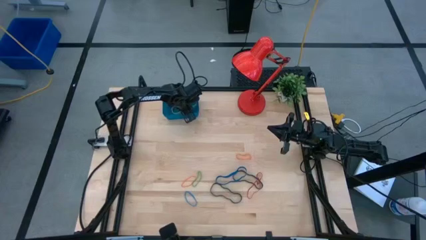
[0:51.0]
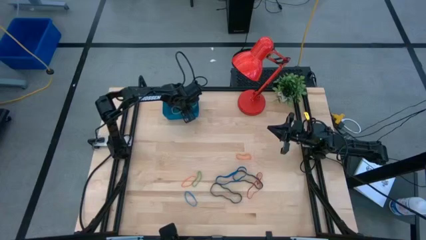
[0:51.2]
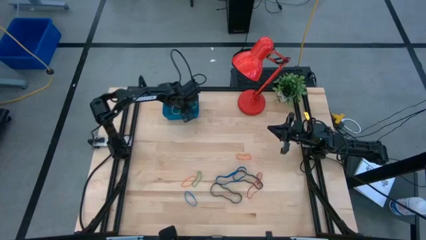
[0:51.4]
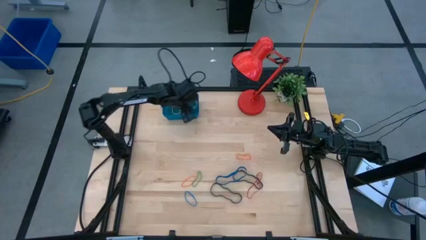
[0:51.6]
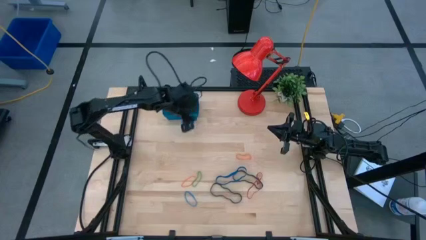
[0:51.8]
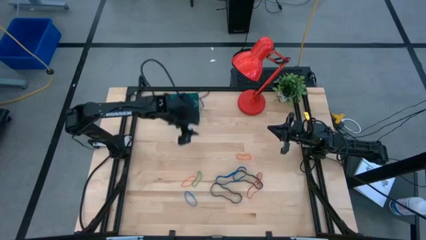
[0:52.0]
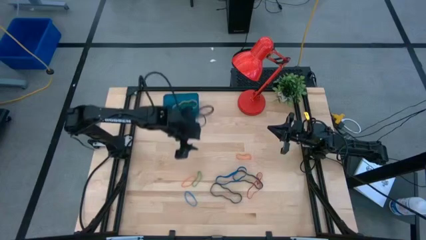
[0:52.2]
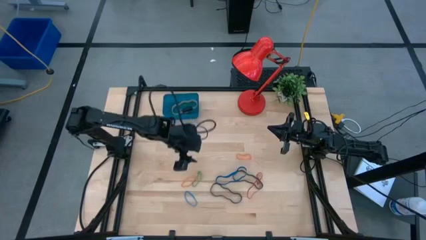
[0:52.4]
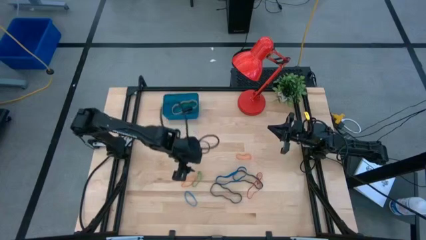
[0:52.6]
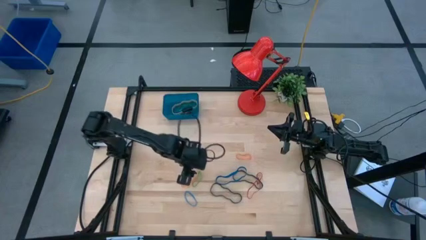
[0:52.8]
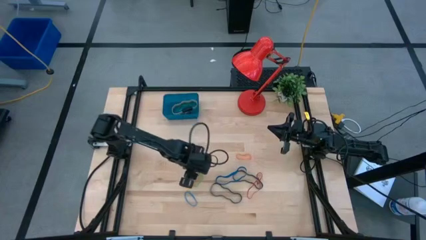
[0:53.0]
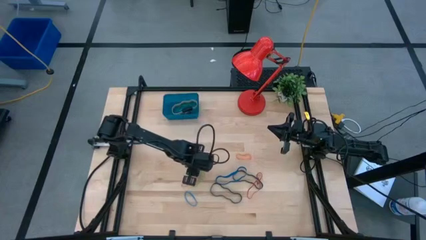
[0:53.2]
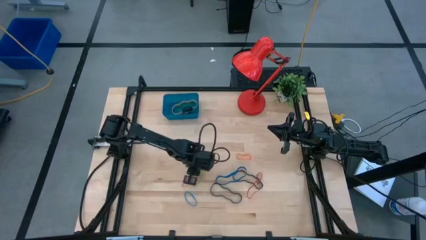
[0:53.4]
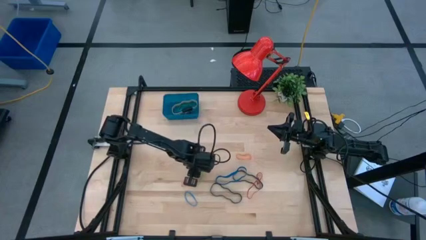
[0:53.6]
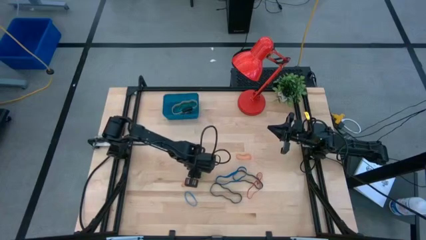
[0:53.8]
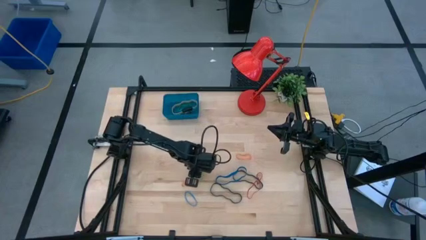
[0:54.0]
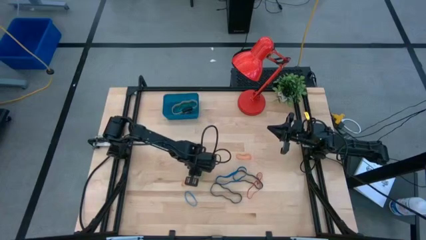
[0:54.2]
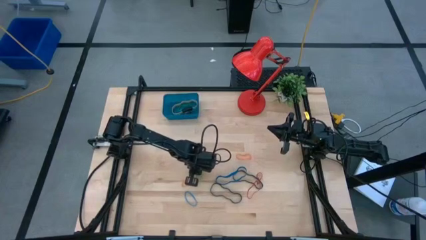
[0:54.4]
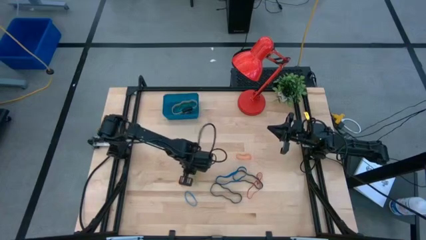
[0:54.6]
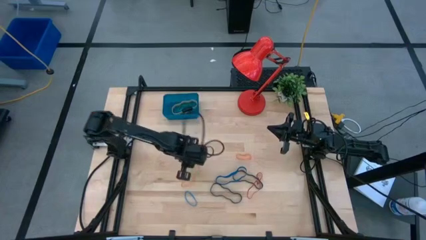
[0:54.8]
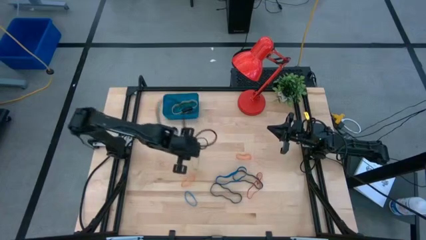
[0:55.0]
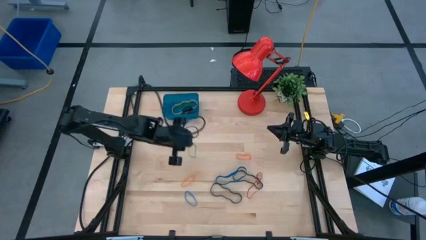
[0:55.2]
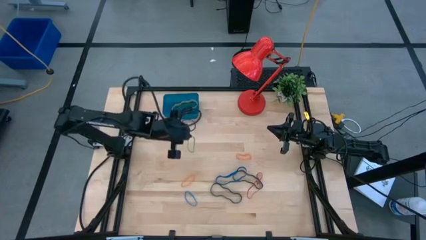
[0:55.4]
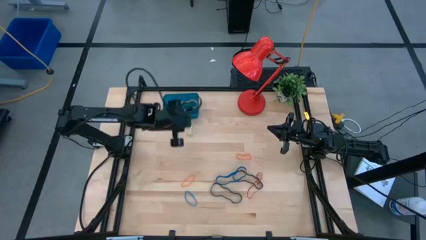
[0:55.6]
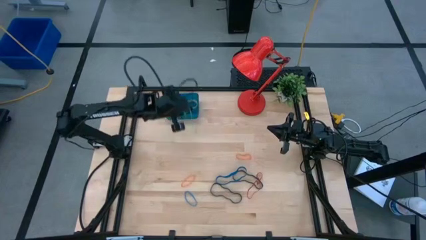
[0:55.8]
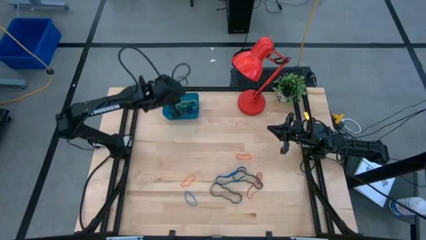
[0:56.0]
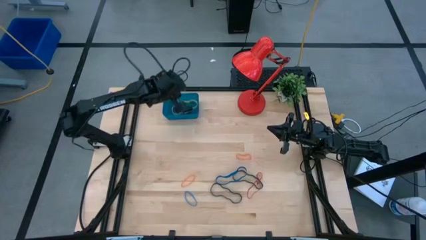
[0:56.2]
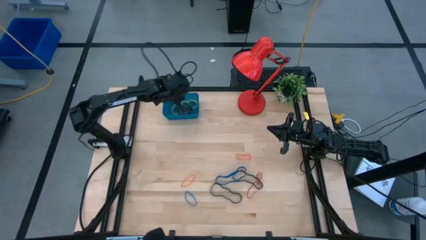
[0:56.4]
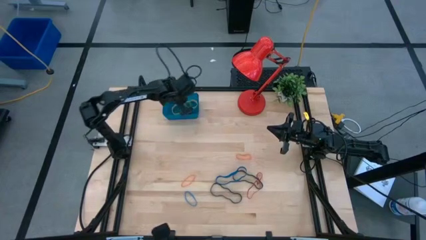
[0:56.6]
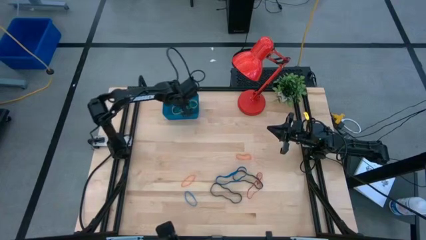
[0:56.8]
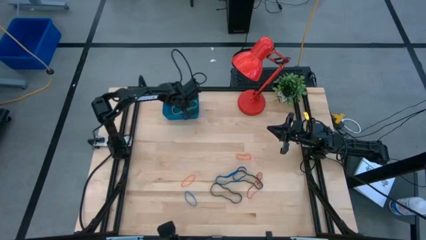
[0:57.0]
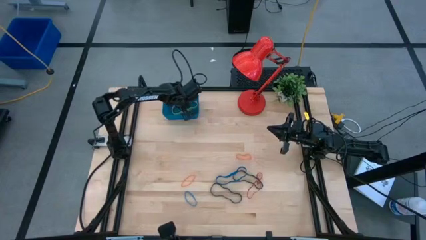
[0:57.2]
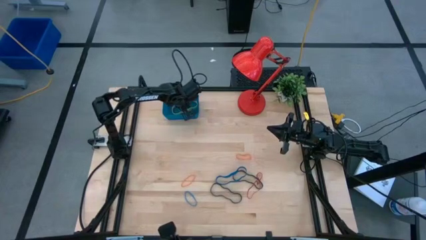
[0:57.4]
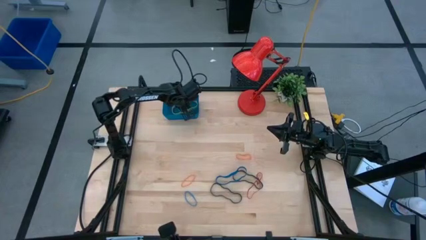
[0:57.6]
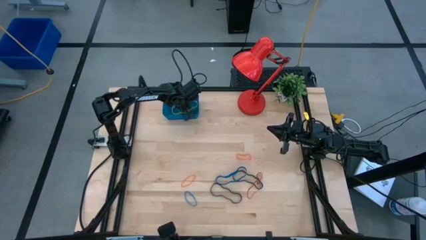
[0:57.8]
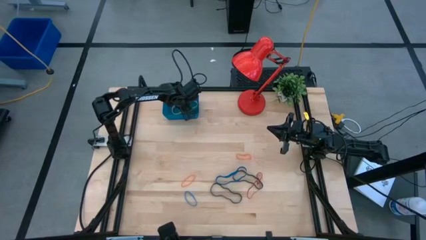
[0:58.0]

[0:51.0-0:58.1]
Task: Pick and place rubber bands into bin
Put the green rubber band into the blue container

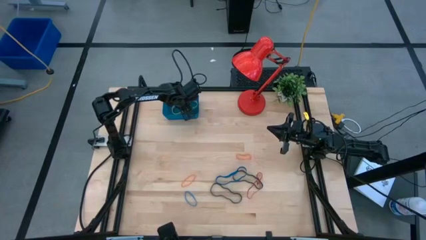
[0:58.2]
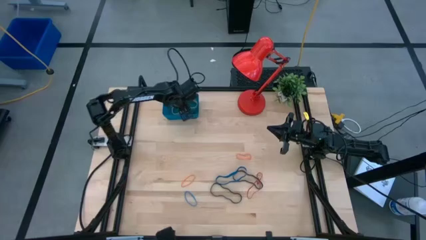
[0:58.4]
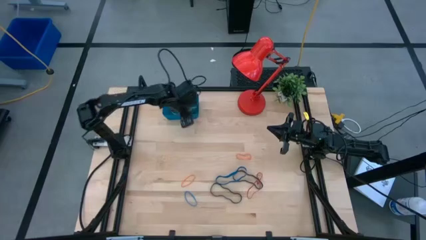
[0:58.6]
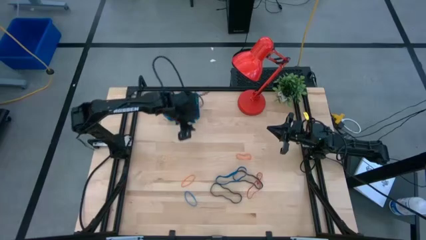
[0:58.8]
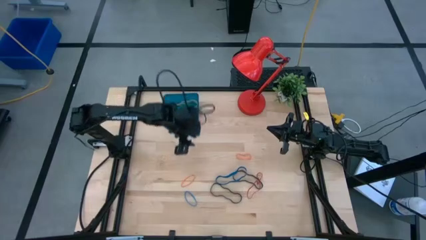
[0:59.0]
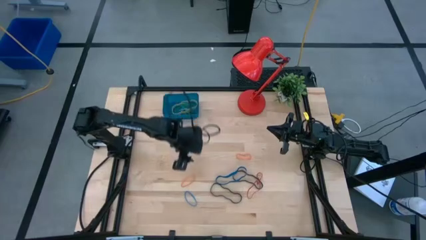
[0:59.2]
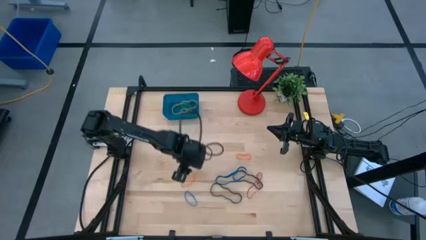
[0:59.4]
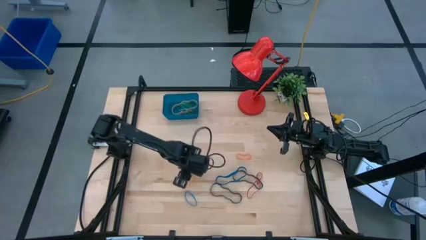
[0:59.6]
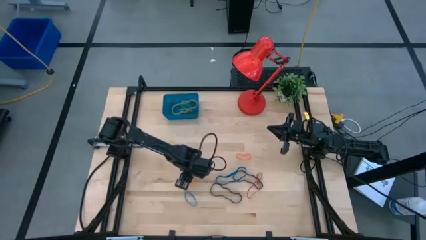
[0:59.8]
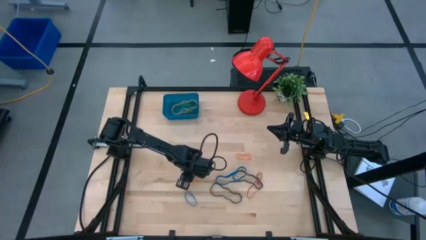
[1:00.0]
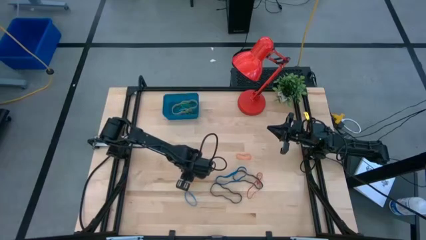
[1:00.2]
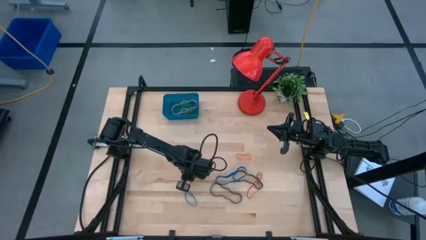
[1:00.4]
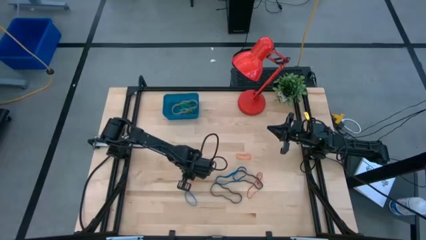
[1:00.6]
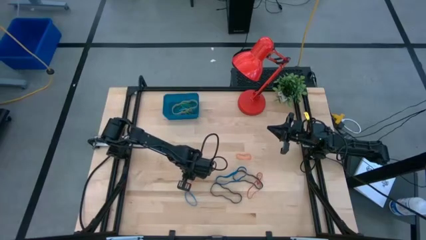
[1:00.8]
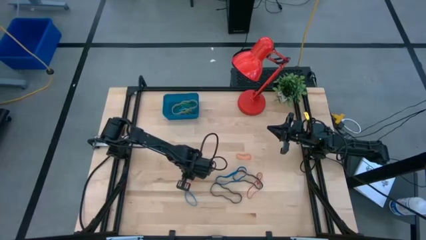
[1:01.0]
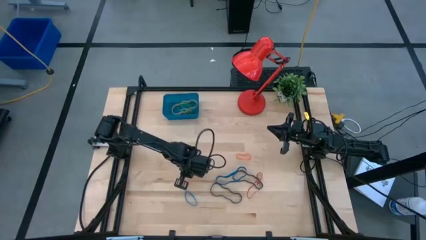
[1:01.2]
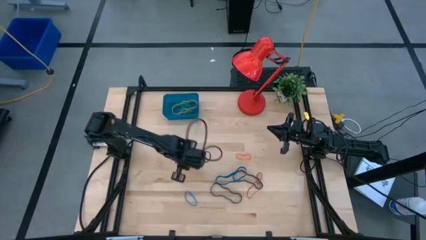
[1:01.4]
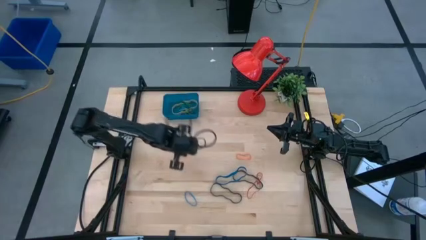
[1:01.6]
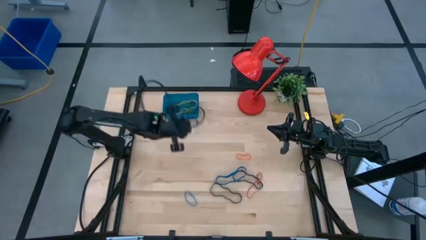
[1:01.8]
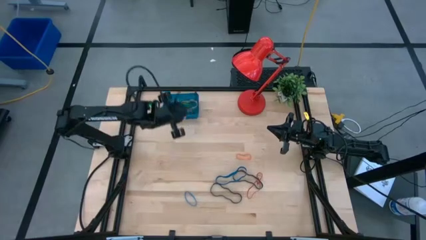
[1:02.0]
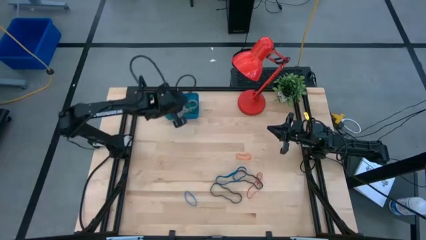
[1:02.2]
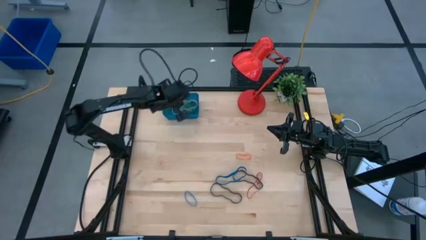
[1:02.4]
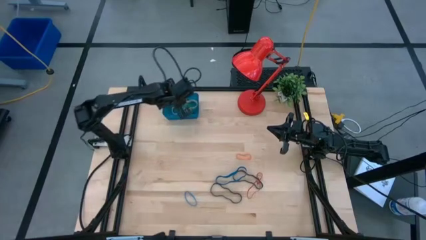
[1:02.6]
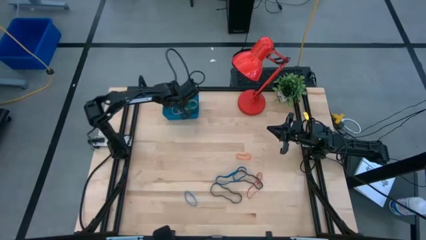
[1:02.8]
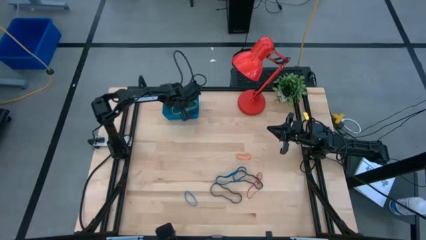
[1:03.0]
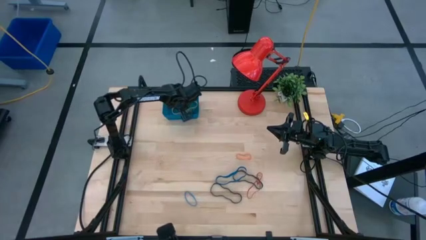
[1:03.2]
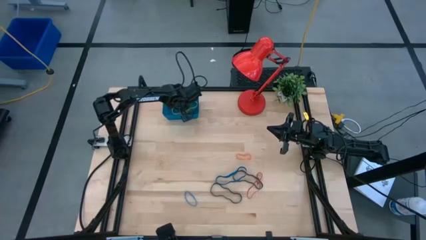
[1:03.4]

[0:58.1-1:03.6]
Put the left orange rubber band into the blue container

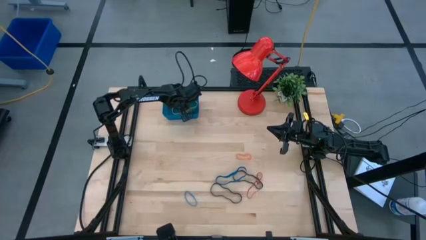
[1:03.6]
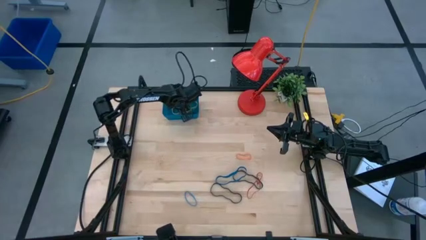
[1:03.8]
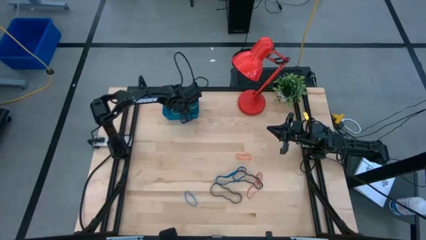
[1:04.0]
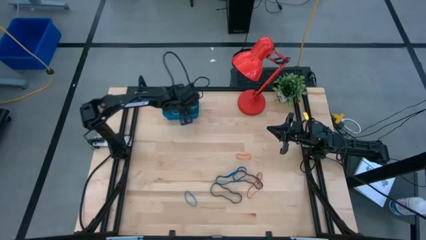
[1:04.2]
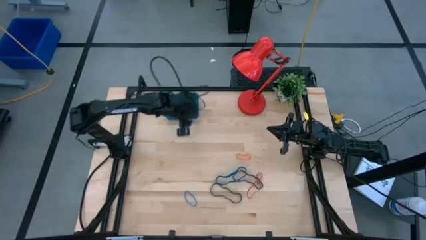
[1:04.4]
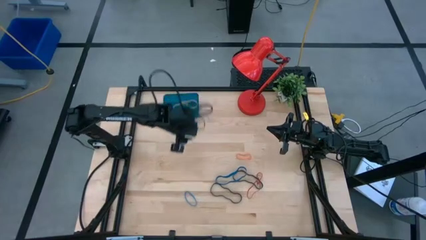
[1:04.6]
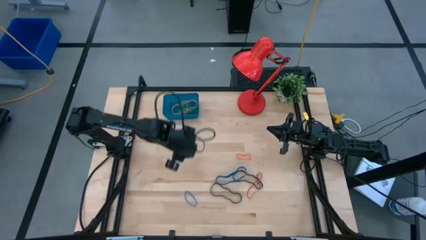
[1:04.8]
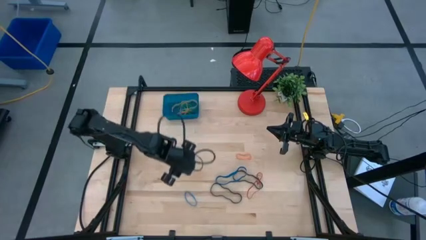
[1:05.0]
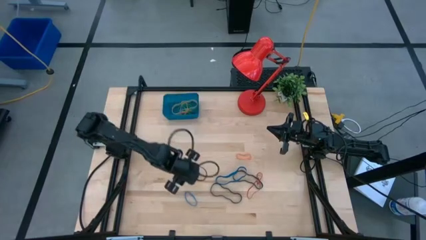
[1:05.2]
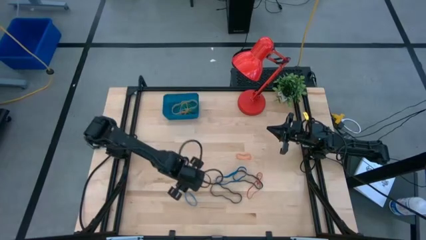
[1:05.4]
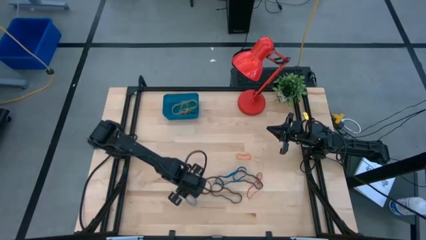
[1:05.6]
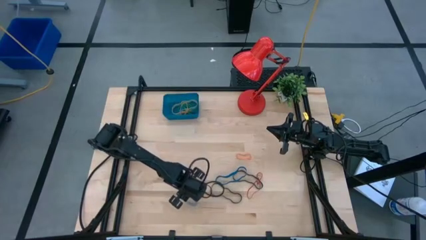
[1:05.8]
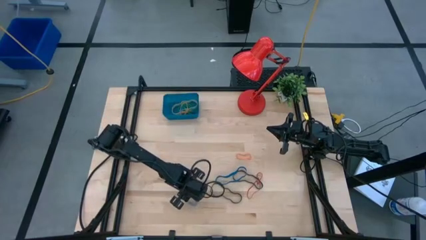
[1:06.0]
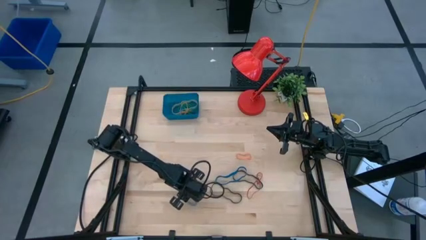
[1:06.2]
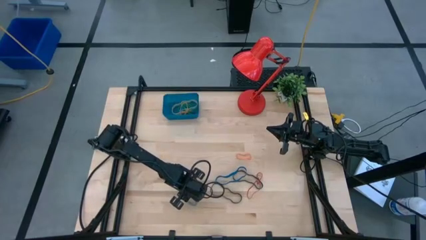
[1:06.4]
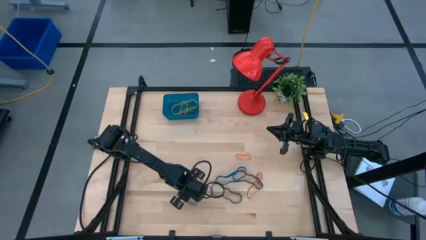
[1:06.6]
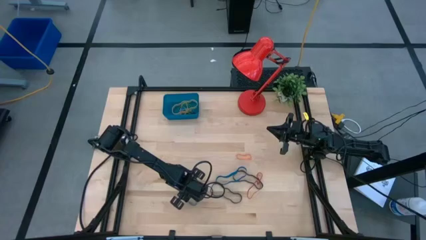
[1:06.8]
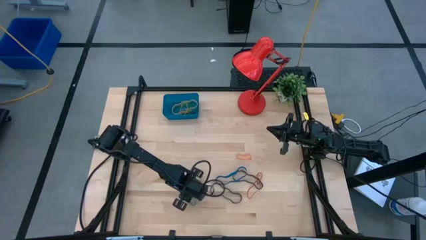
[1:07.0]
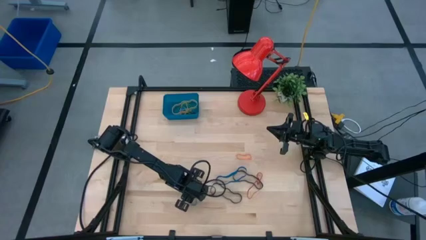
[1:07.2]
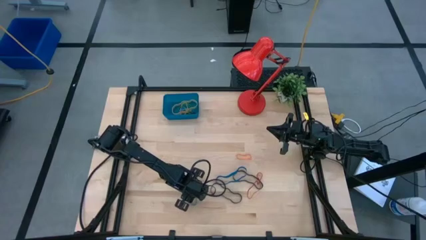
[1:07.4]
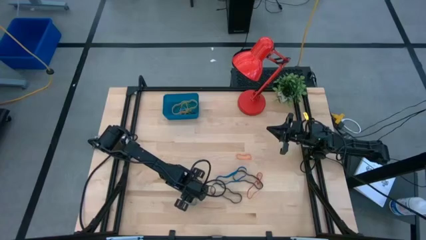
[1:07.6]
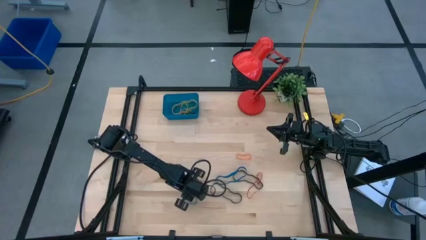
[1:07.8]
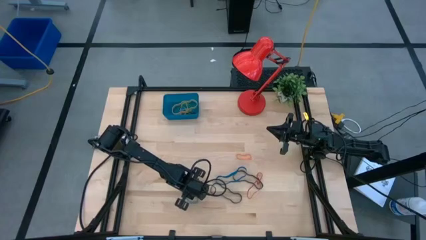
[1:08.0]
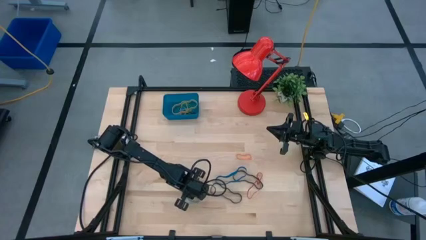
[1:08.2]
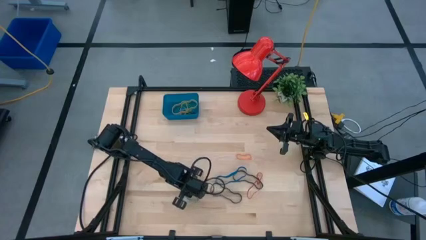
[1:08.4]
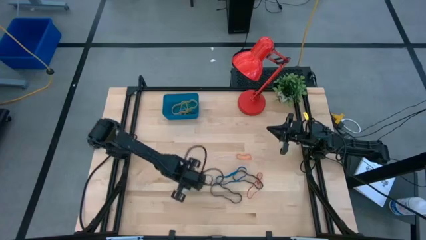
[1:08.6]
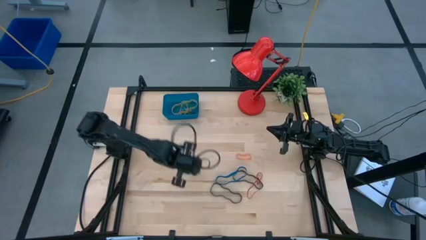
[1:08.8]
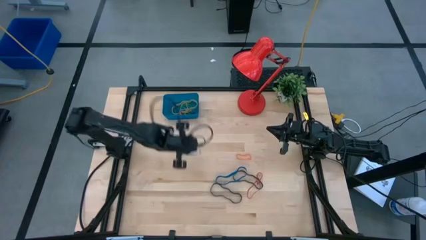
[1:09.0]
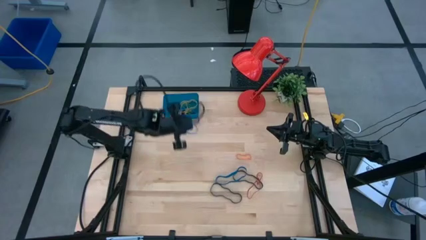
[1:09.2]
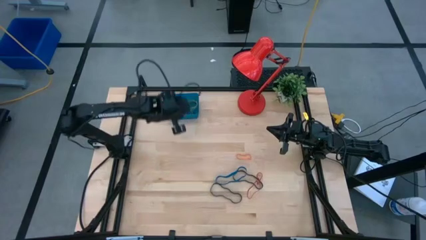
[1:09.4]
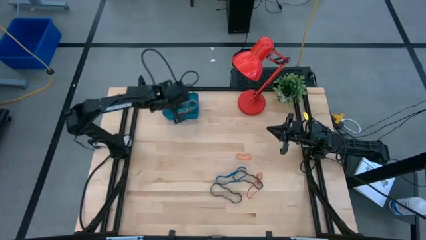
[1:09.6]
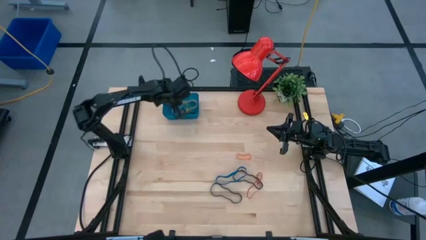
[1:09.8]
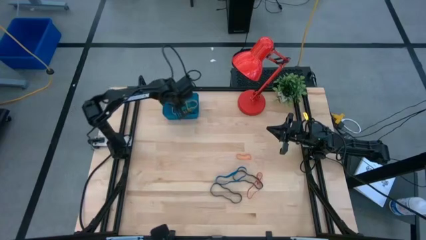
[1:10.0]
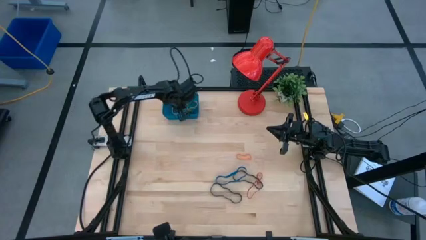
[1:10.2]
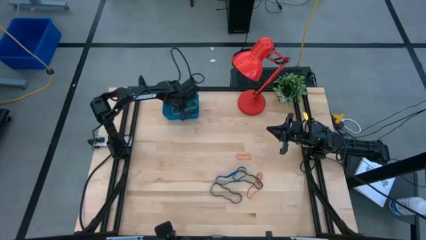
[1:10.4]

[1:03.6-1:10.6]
Put the blue rubber band into the blue container
